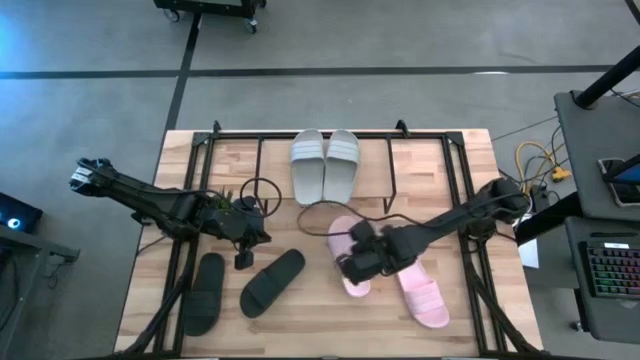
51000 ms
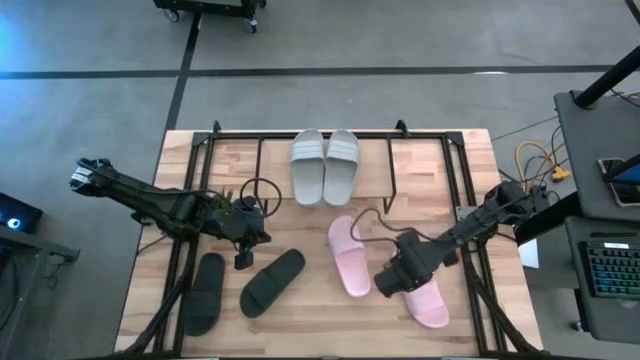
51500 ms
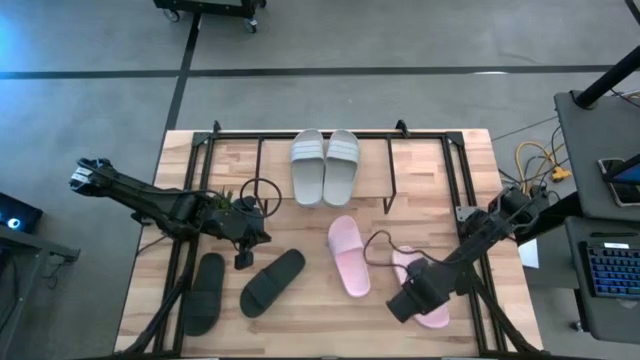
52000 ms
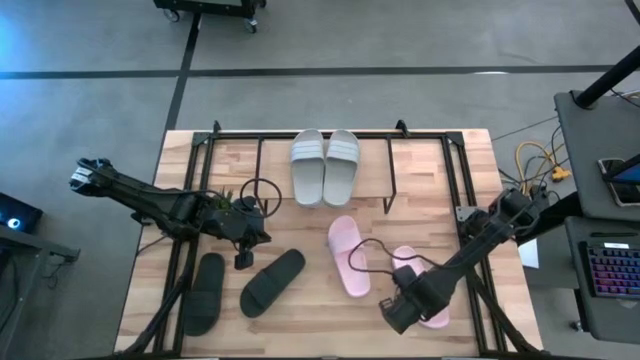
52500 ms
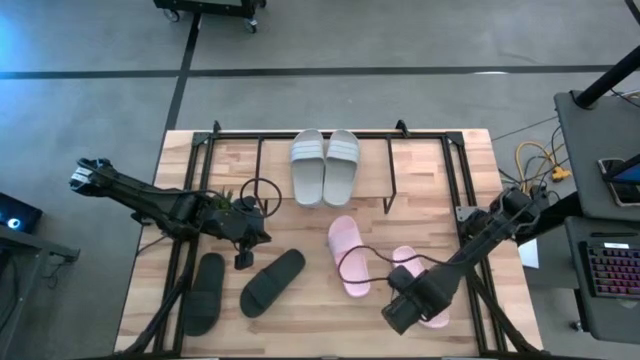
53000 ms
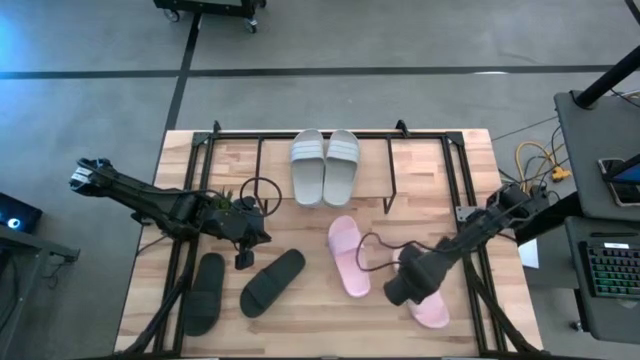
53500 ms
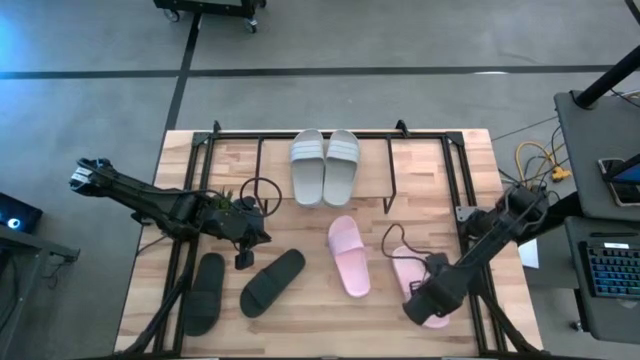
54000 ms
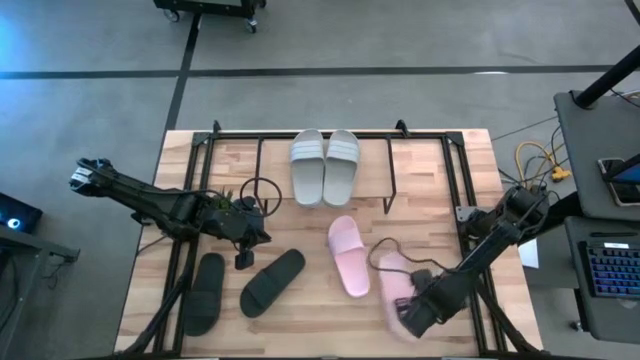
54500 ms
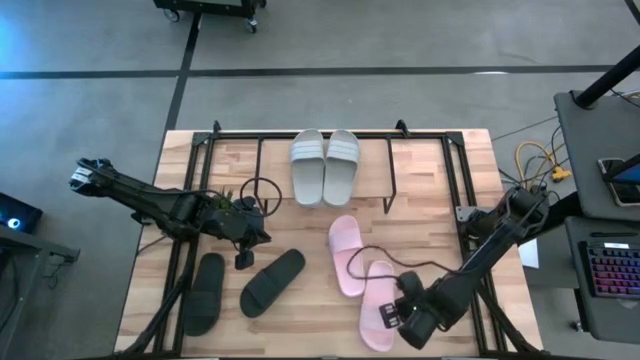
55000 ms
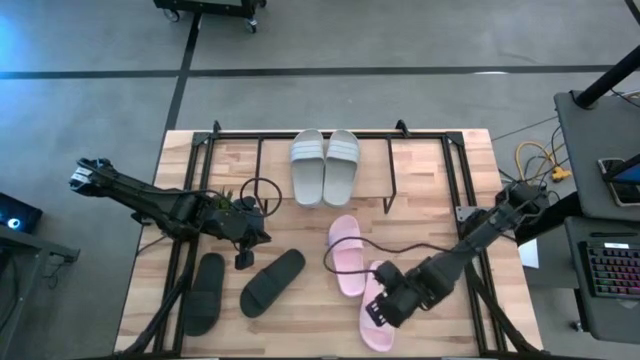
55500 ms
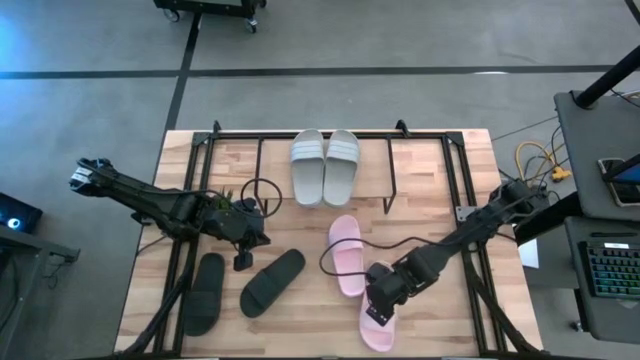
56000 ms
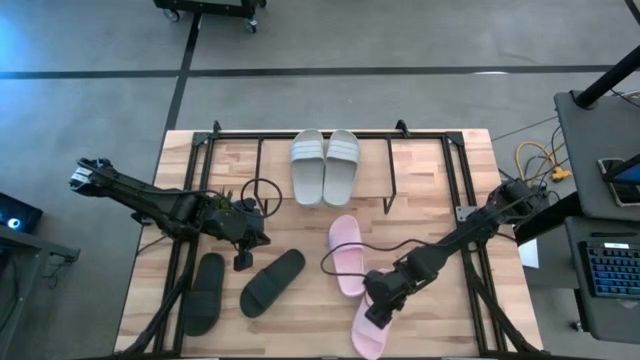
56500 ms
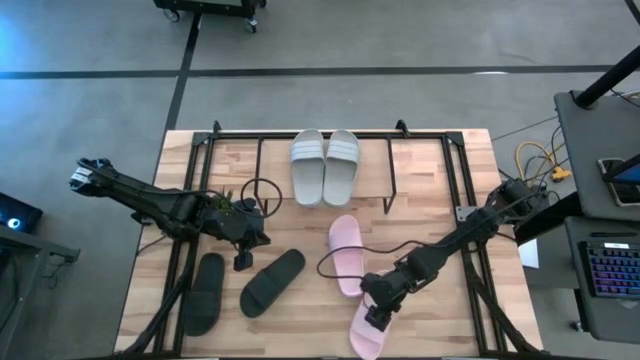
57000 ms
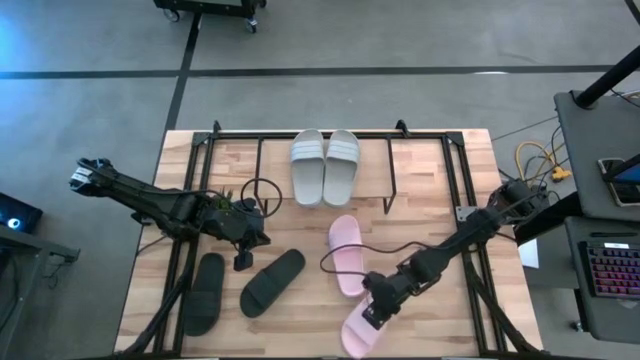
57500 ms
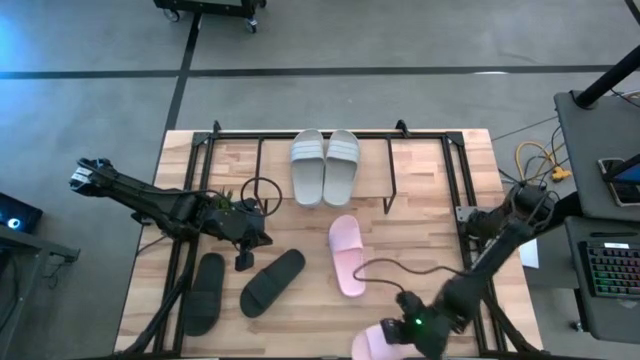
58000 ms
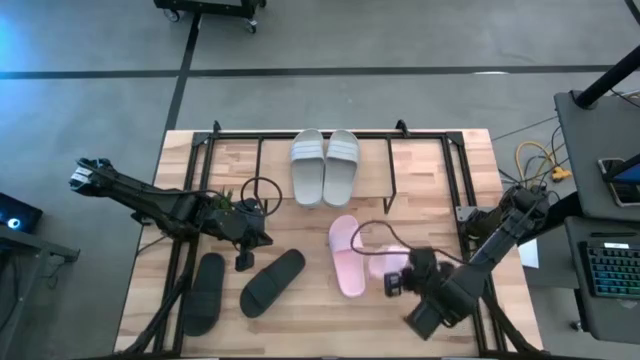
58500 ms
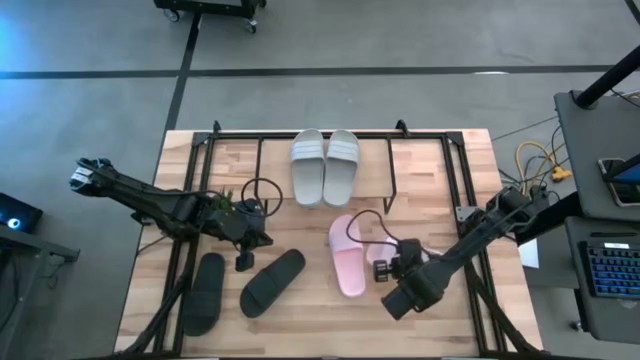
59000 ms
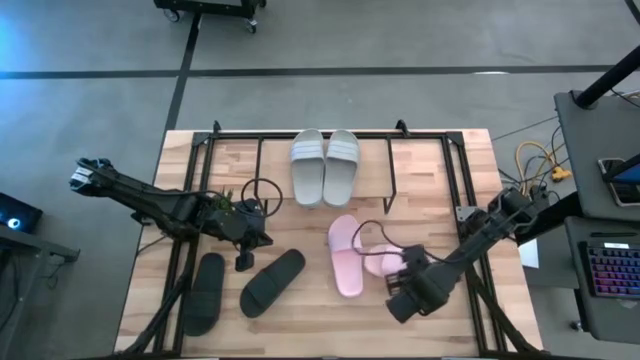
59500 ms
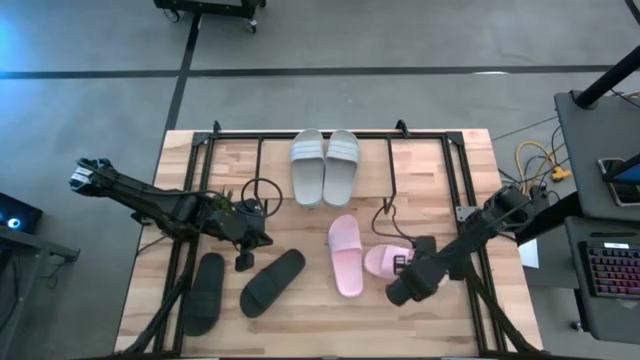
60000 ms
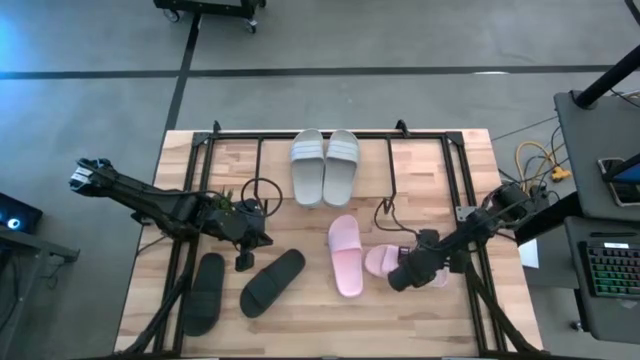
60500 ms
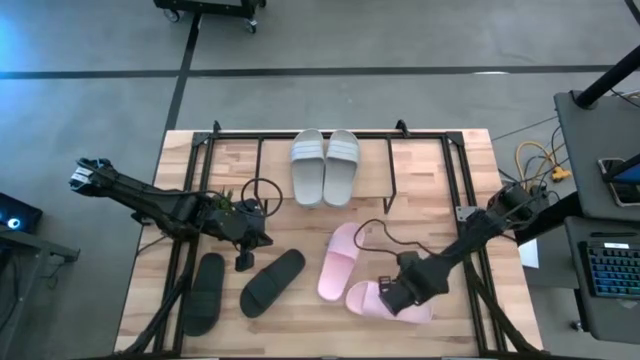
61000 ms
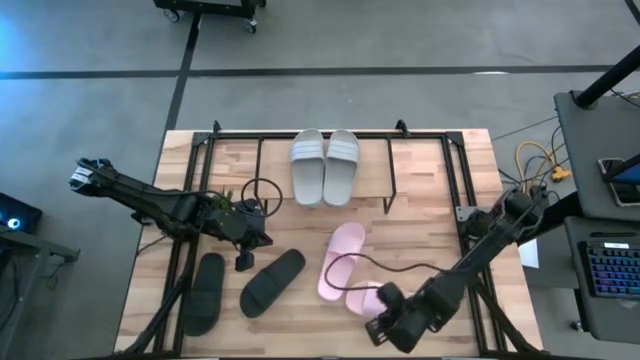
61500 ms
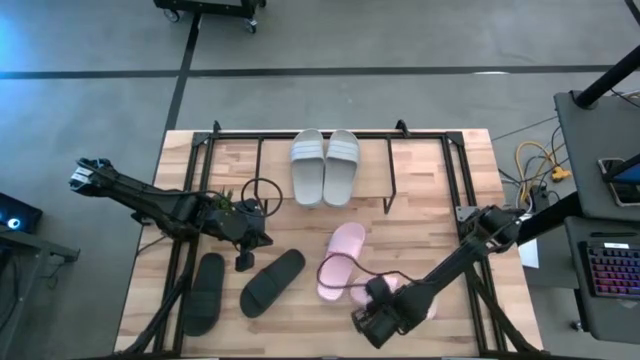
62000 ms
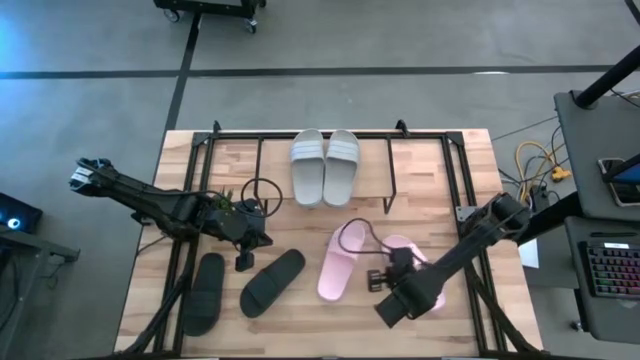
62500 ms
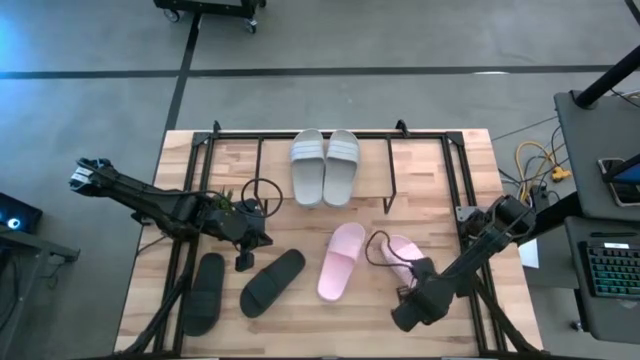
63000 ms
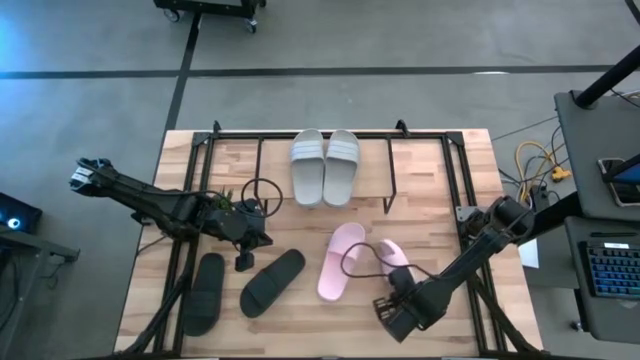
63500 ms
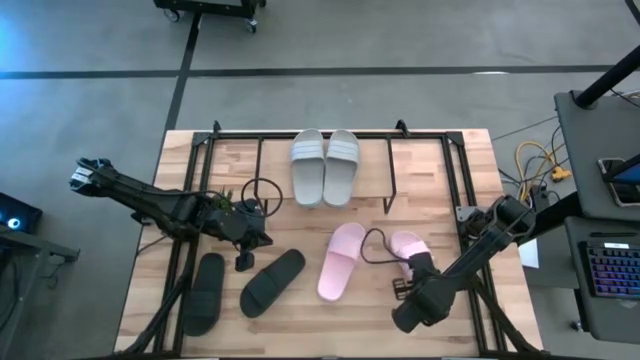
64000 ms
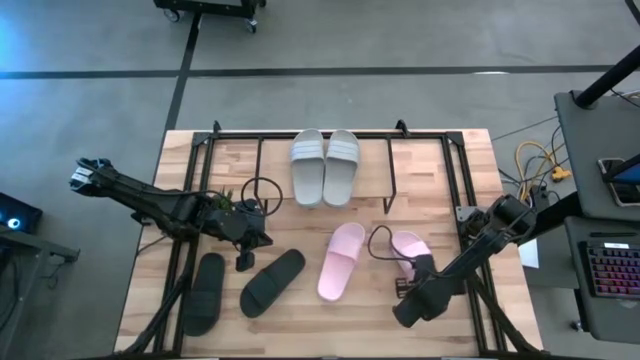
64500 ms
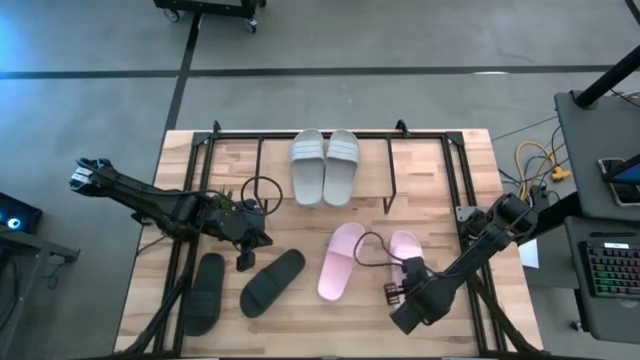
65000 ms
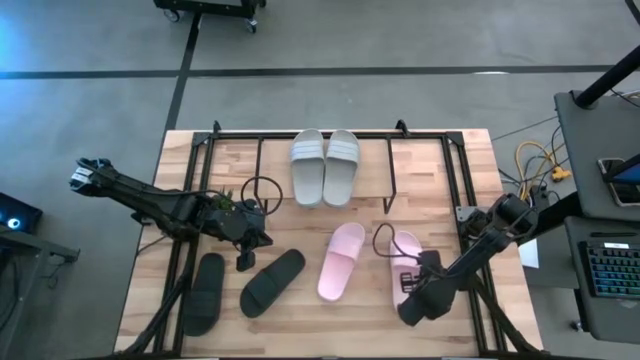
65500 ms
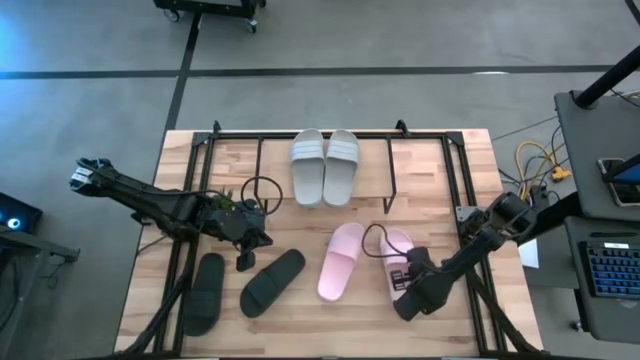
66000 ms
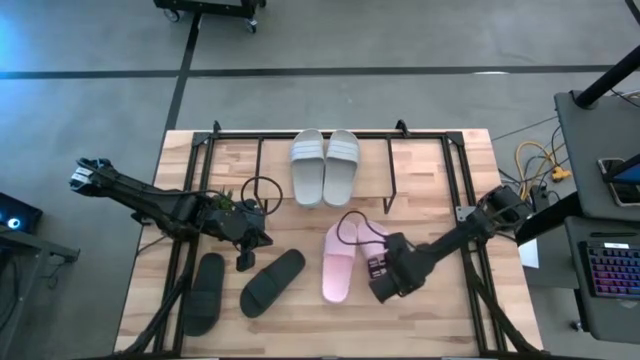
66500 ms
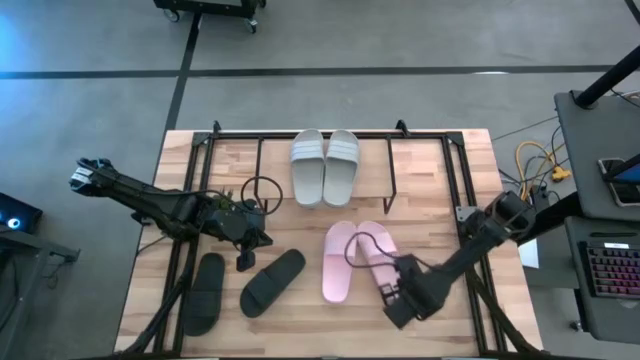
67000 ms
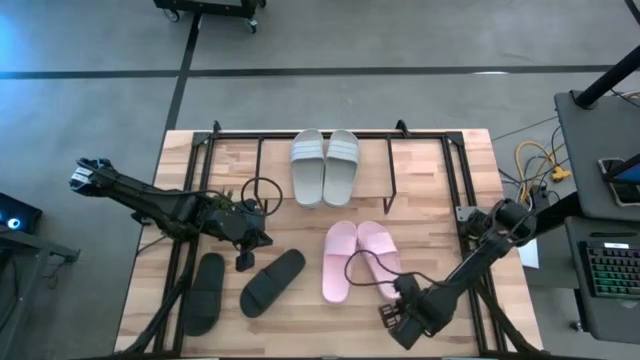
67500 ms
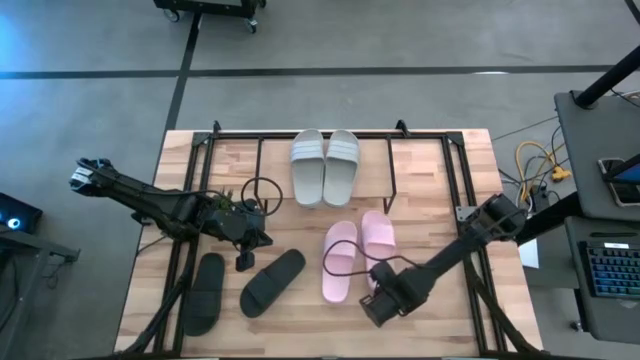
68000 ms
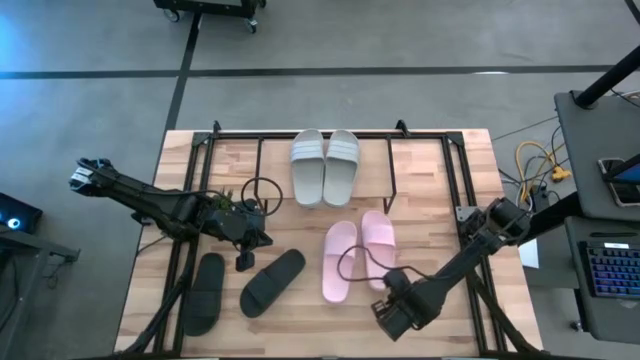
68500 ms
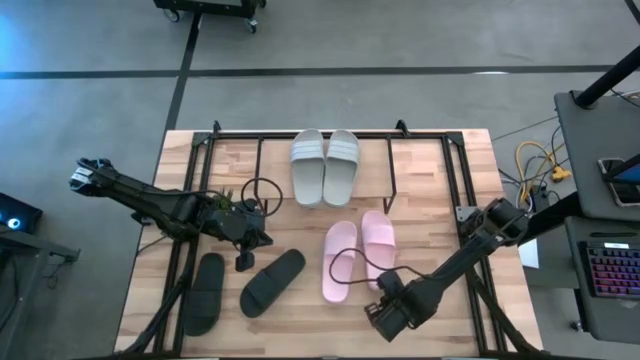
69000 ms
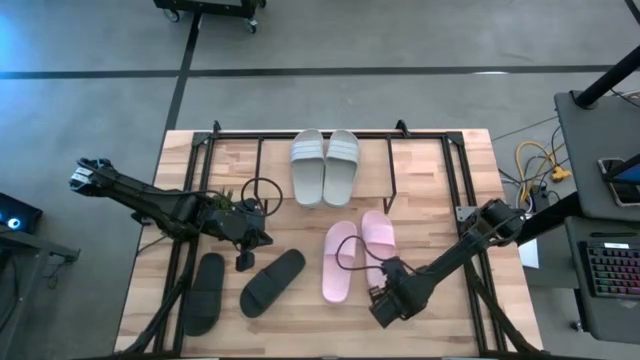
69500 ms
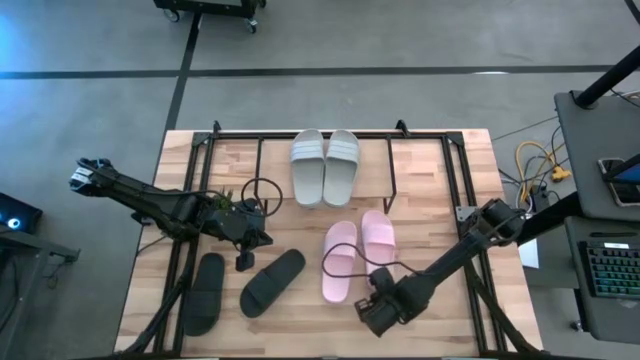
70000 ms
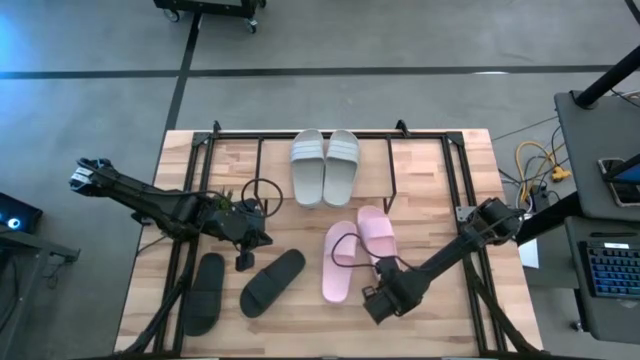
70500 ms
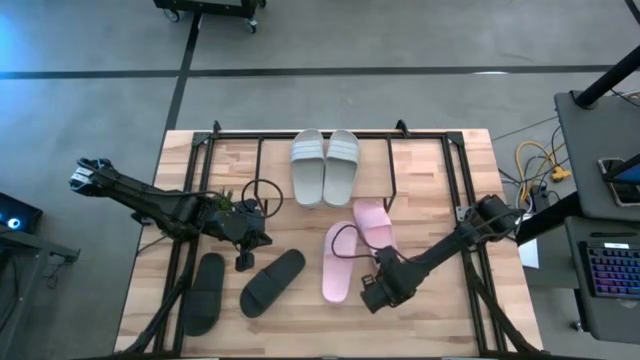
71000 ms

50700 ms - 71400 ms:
Task: Pick and place slides into the shelf
Adjust the right pink slide

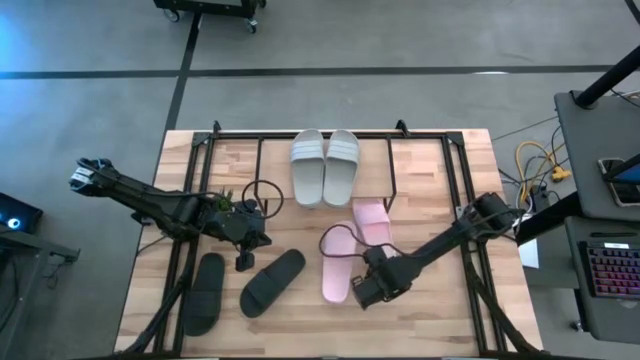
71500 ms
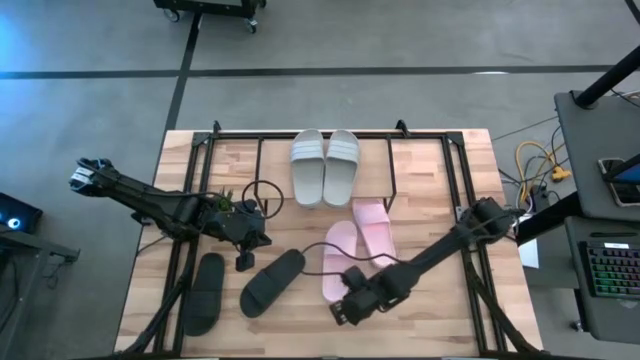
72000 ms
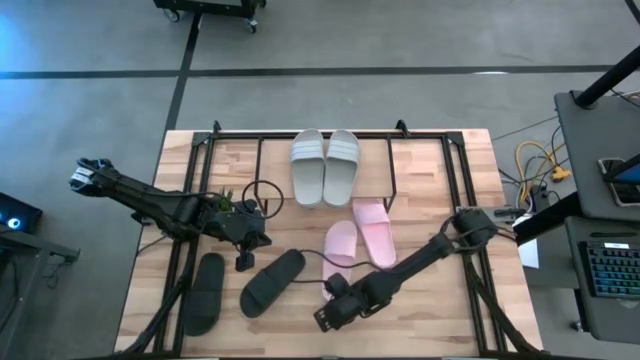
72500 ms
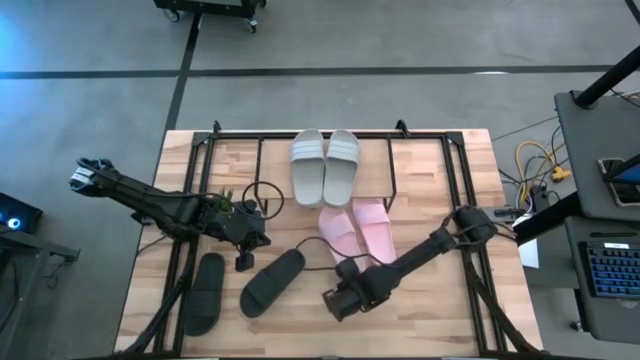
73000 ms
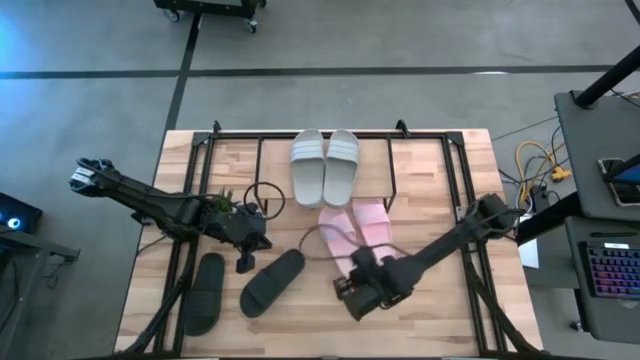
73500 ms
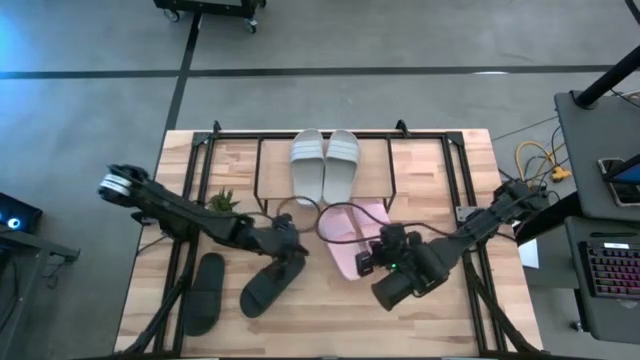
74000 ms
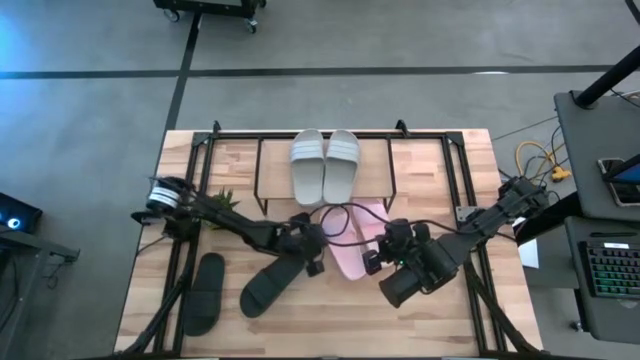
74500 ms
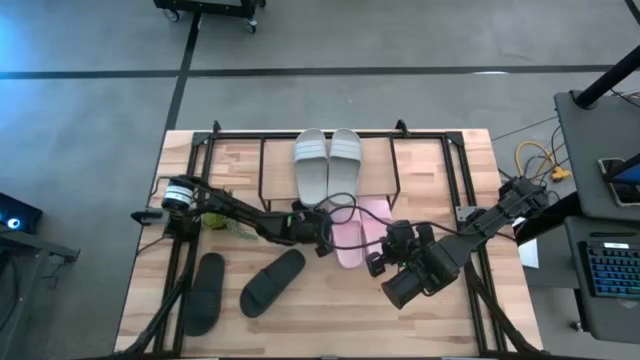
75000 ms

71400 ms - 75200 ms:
Adjust the left pink slide
